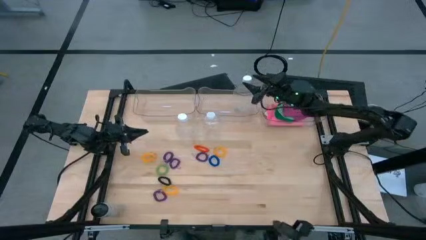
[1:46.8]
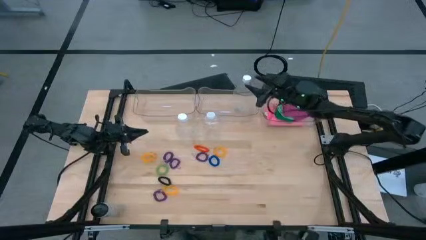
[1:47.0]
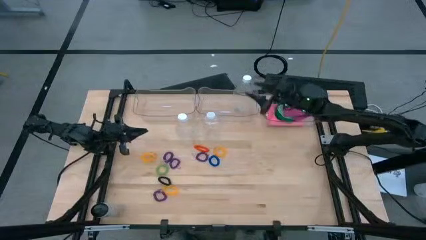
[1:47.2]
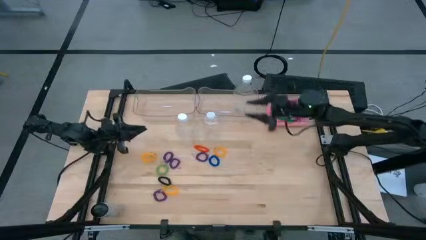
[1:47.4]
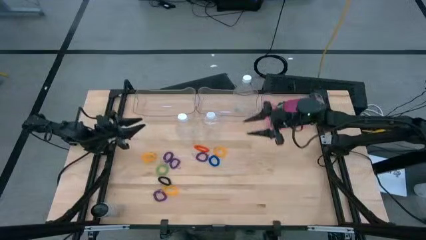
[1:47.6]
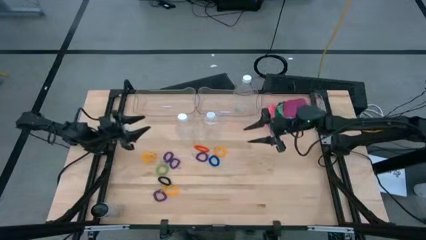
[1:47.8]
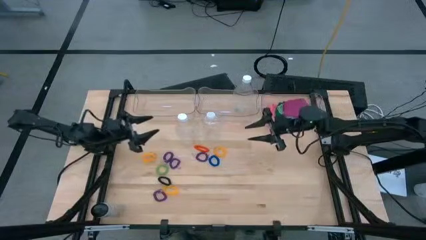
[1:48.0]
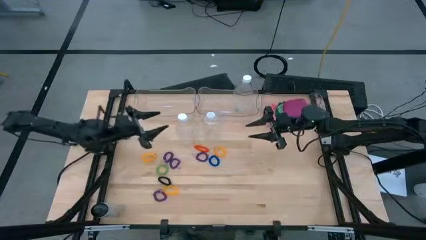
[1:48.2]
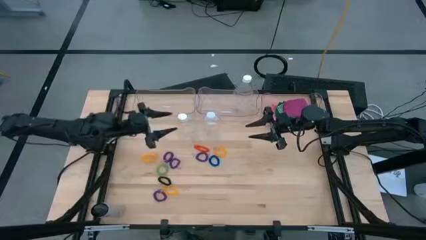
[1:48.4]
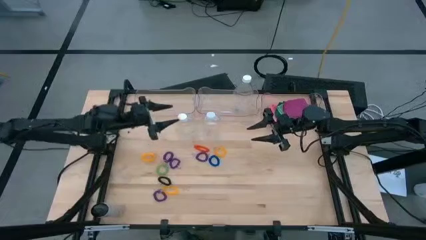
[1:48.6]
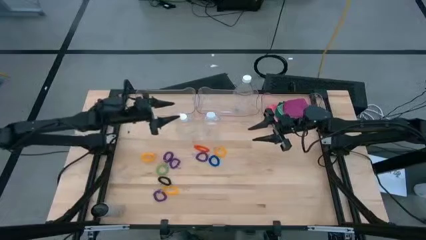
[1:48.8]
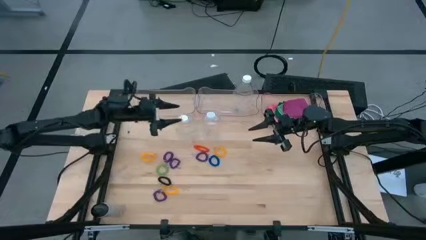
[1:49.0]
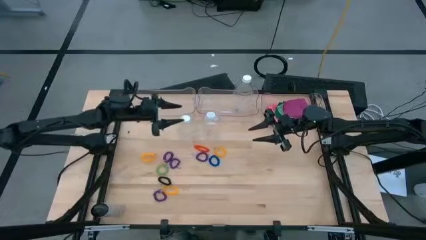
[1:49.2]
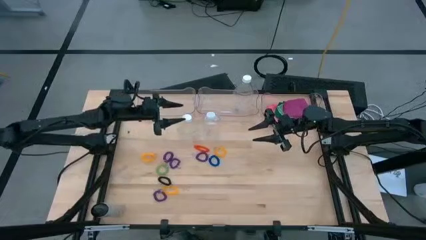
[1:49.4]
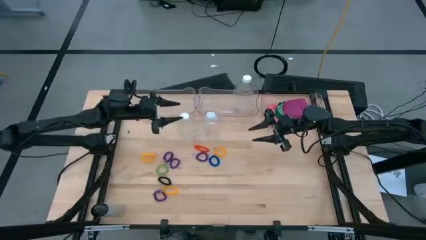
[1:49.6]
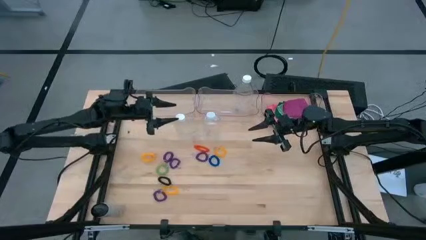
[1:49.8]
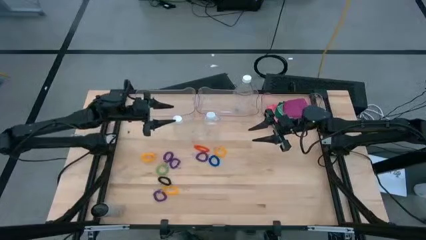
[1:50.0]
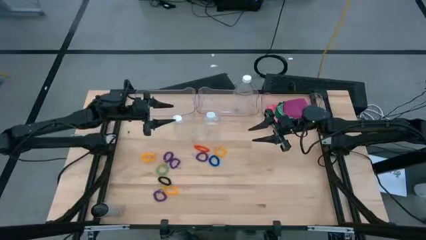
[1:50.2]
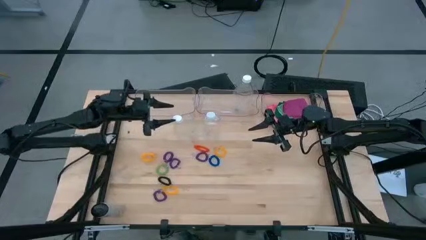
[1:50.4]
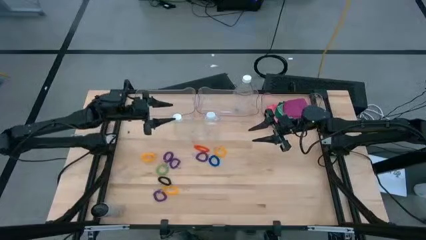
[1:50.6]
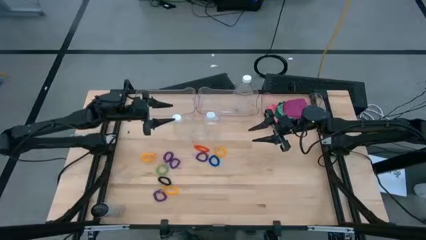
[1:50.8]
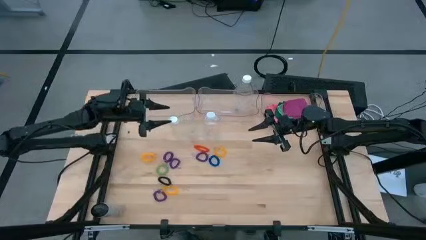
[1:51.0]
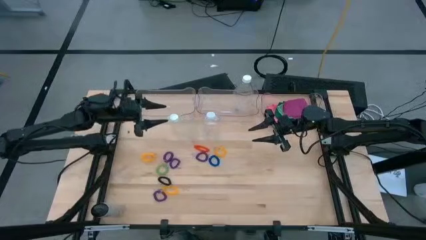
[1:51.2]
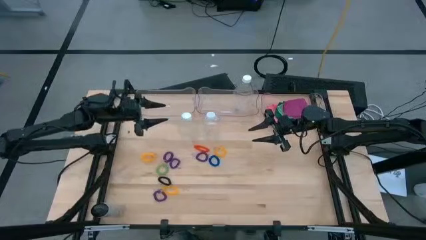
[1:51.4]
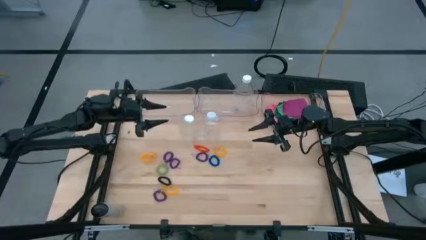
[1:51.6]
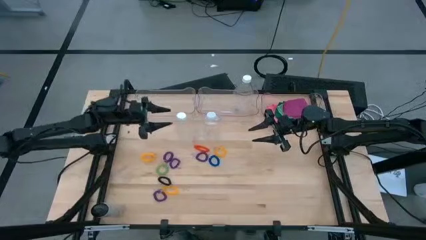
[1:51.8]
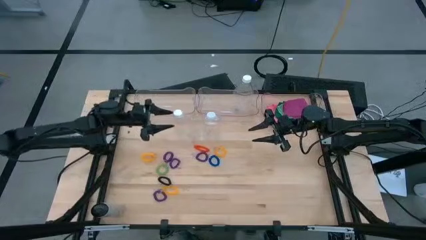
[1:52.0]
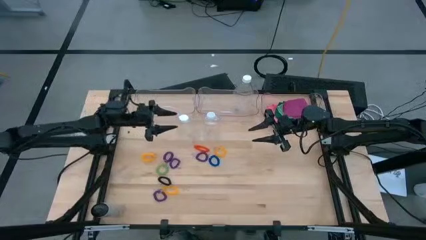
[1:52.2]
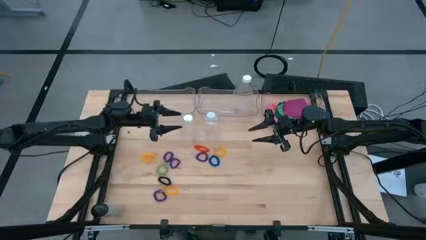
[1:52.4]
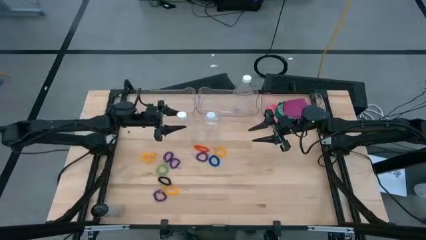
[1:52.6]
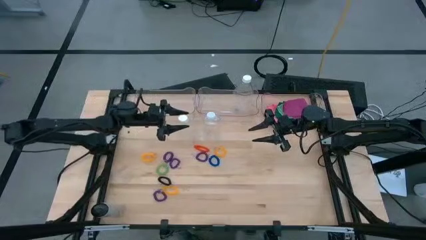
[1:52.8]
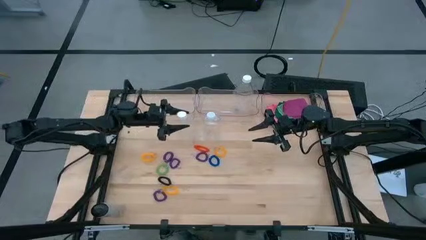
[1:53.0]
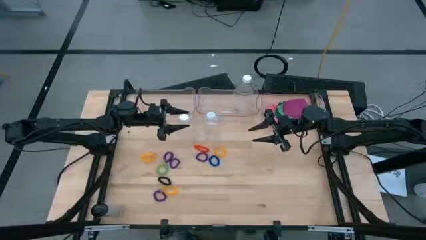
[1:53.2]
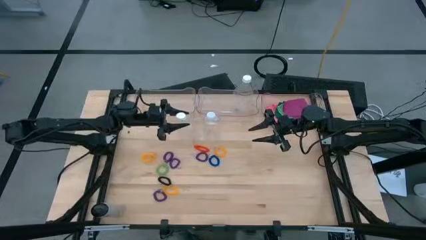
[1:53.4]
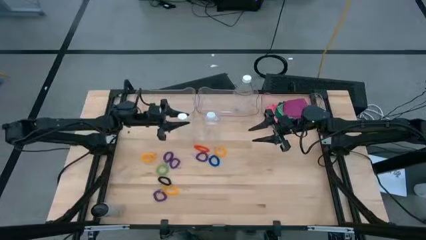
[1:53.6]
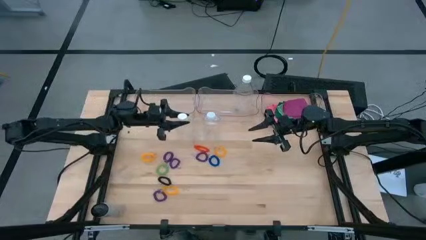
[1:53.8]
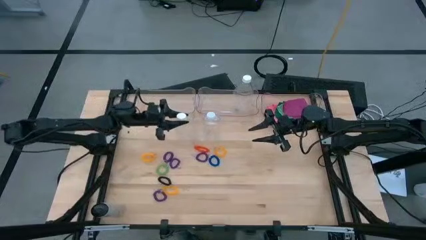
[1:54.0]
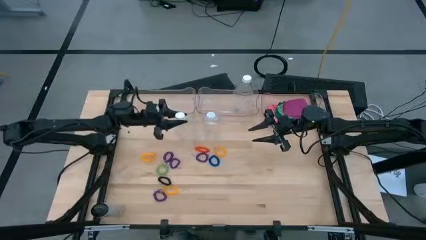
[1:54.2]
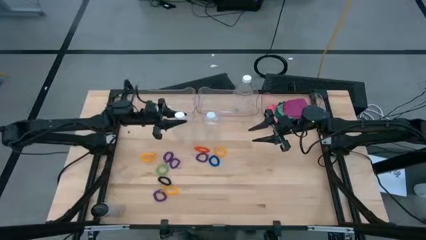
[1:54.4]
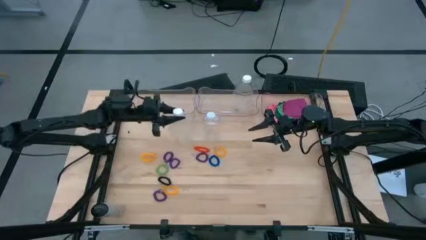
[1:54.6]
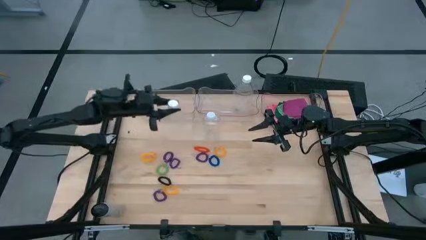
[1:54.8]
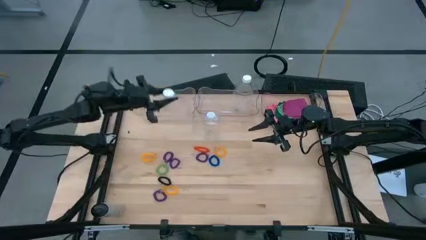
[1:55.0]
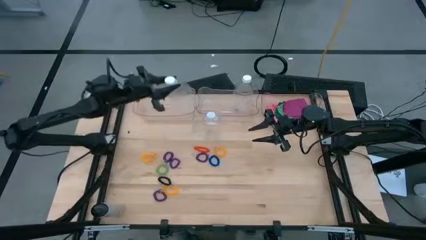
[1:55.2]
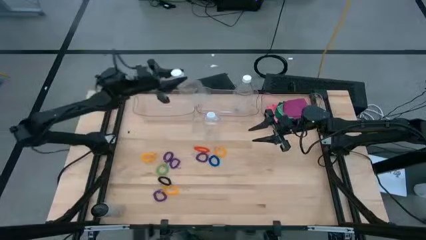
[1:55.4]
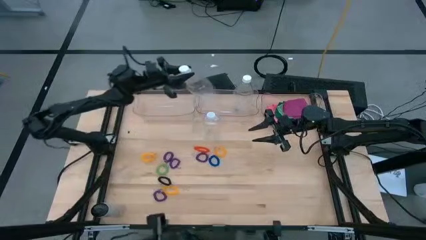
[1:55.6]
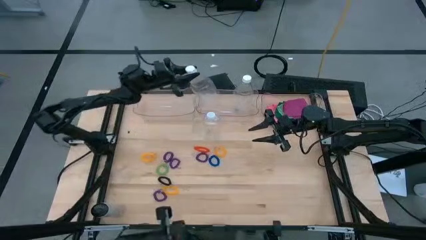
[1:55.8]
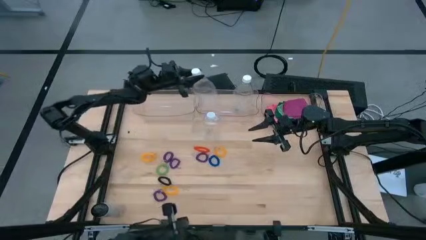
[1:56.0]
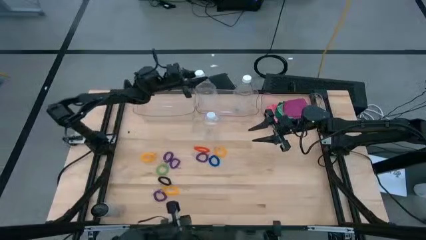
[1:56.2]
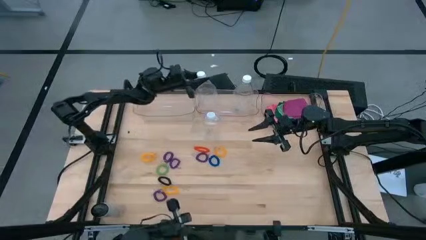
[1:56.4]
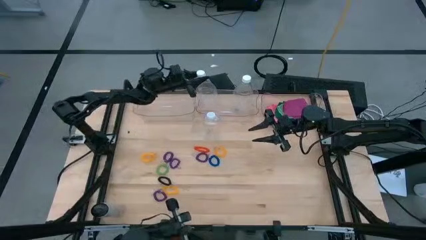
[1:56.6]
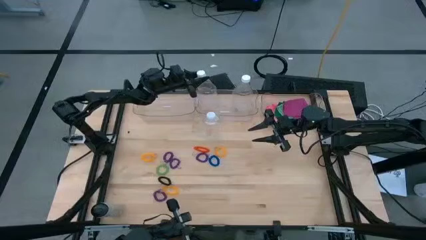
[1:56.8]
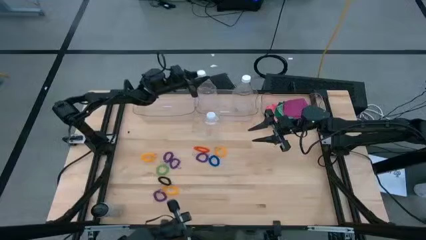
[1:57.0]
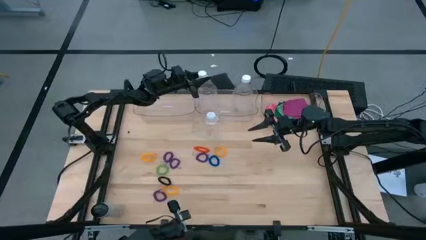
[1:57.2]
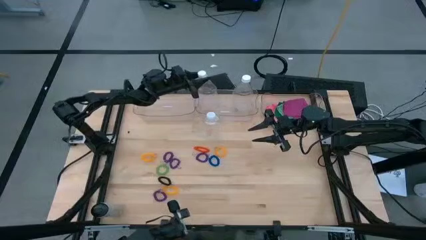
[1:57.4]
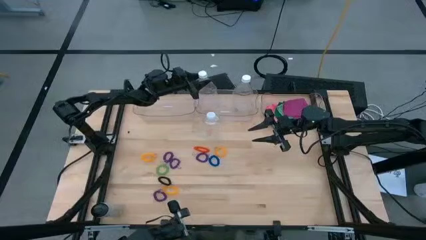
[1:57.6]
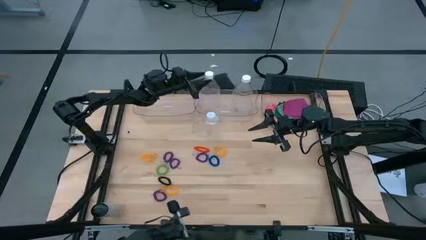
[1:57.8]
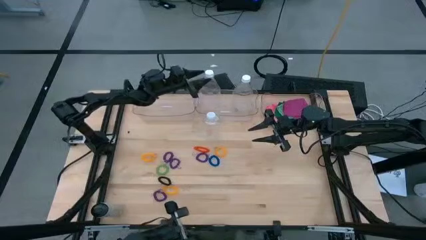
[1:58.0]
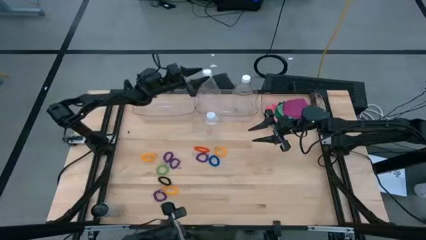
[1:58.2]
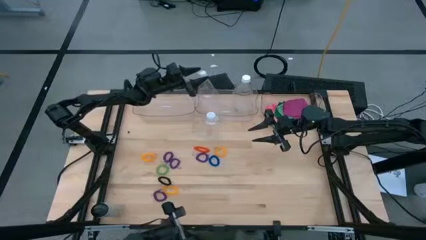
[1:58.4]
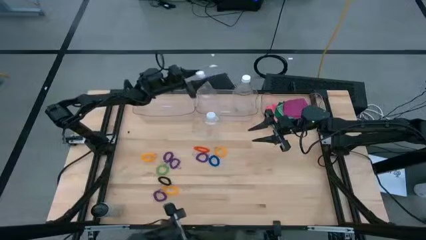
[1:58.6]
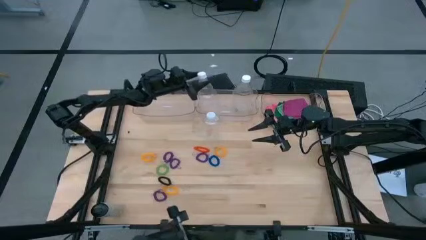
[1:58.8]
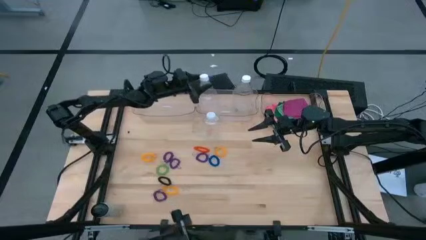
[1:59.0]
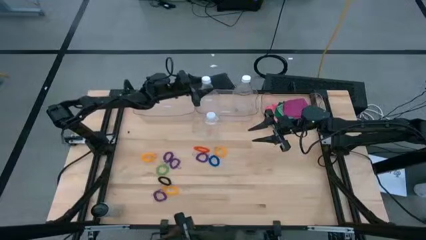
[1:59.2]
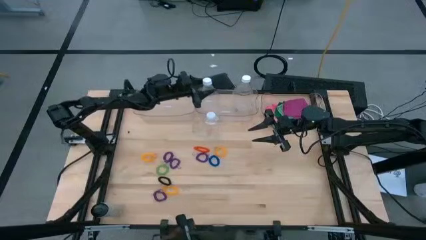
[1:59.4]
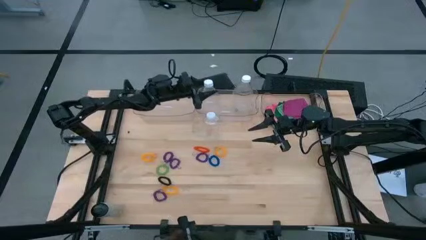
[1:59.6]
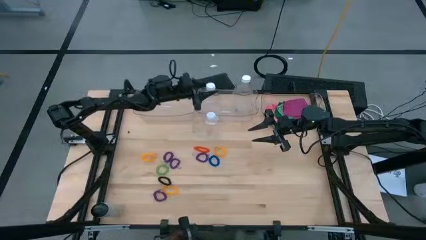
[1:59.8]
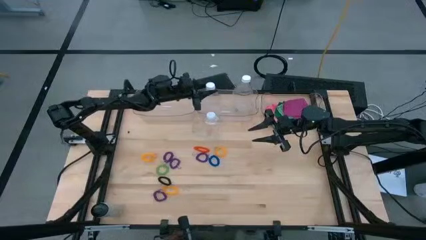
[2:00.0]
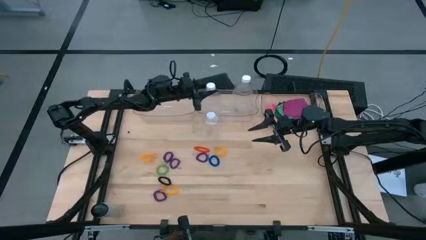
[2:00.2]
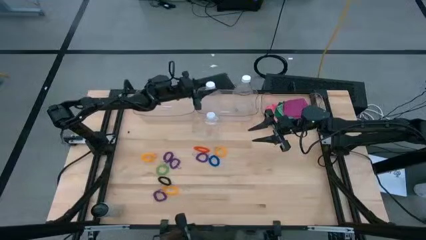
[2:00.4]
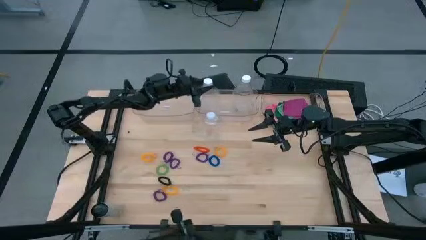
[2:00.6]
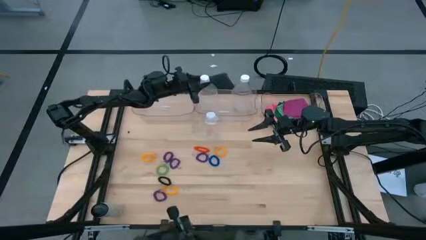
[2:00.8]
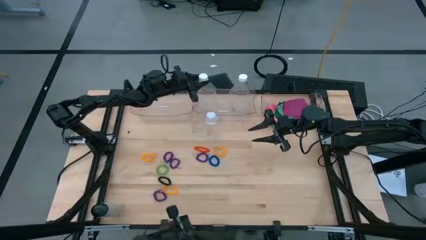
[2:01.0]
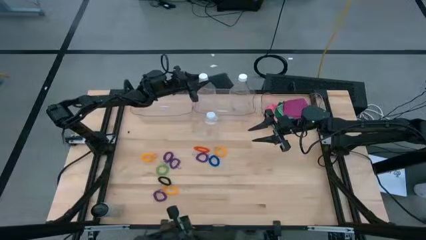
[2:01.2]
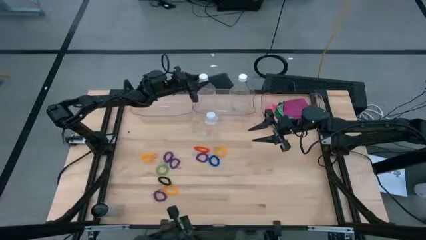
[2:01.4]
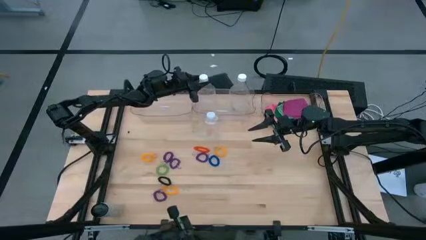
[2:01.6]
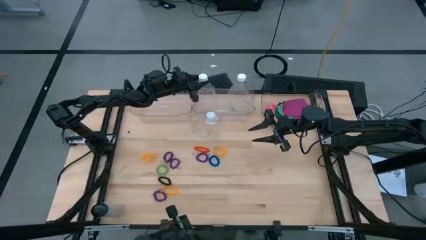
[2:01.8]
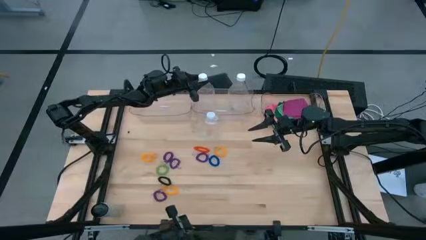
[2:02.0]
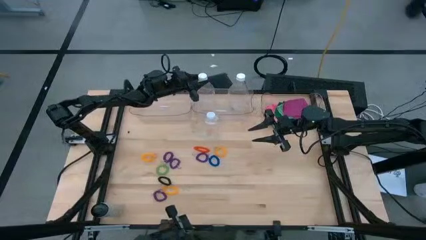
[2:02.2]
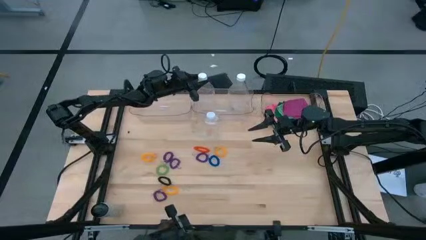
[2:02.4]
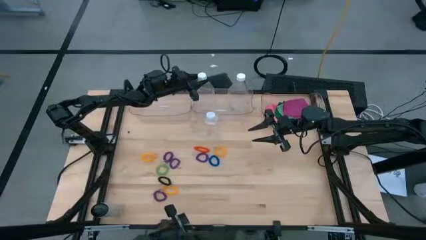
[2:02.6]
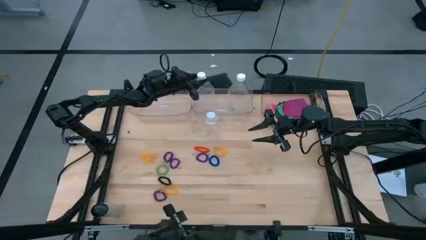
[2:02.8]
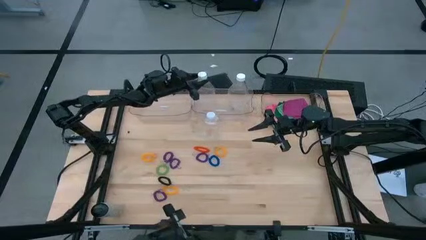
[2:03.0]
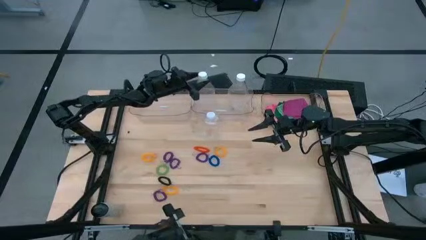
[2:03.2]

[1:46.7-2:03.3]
Task: Pick & Place Sports Items
Put the left plastic bottle into the middle transparent bin
